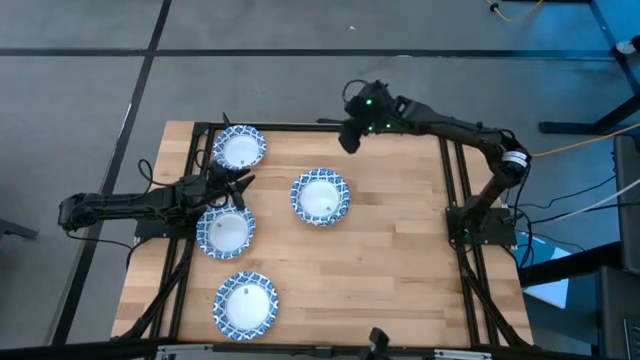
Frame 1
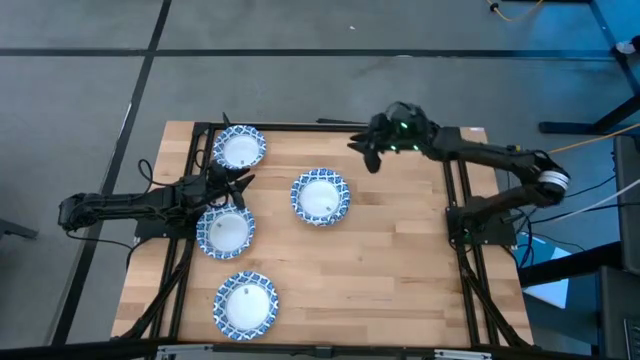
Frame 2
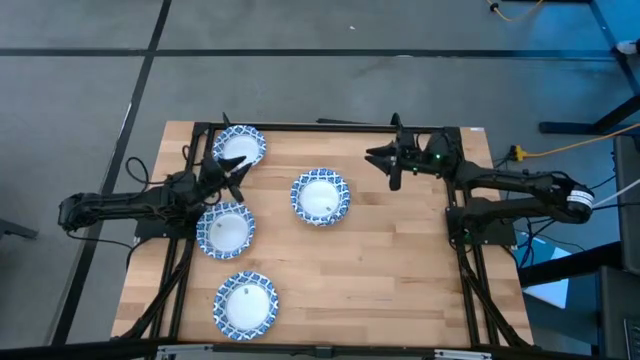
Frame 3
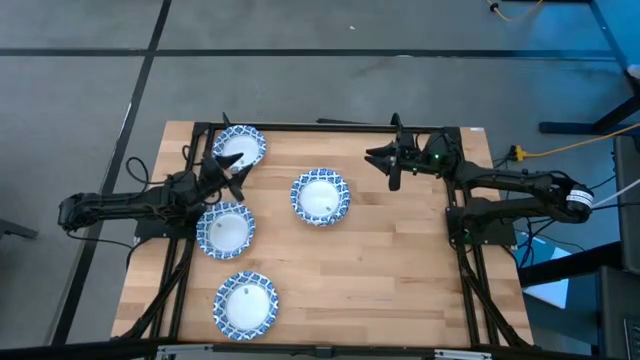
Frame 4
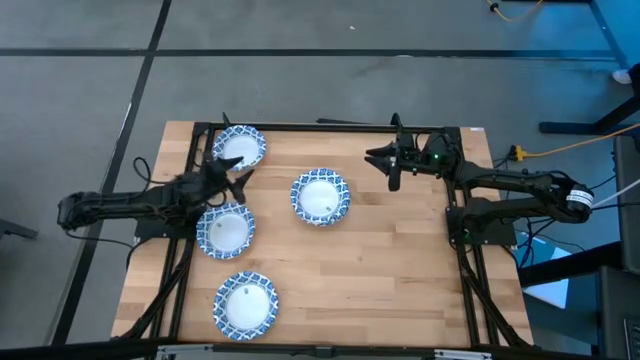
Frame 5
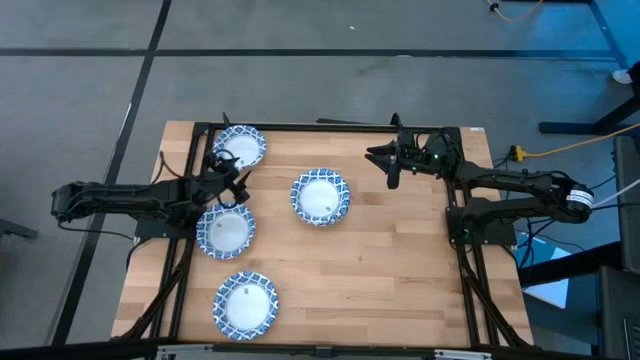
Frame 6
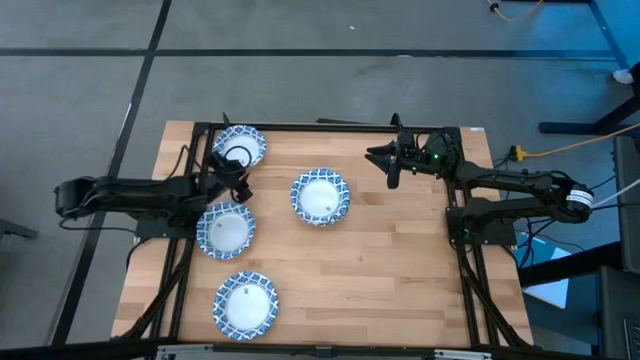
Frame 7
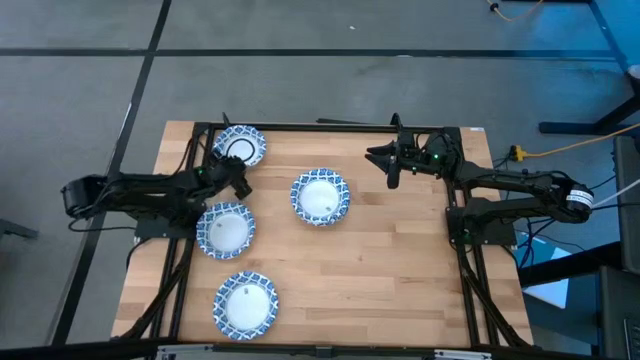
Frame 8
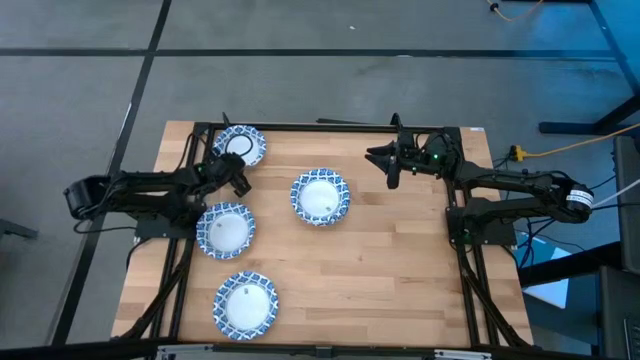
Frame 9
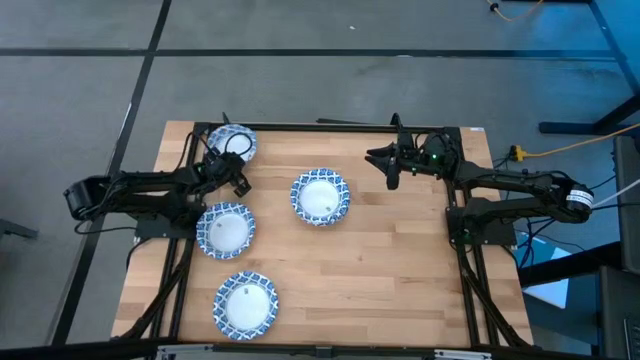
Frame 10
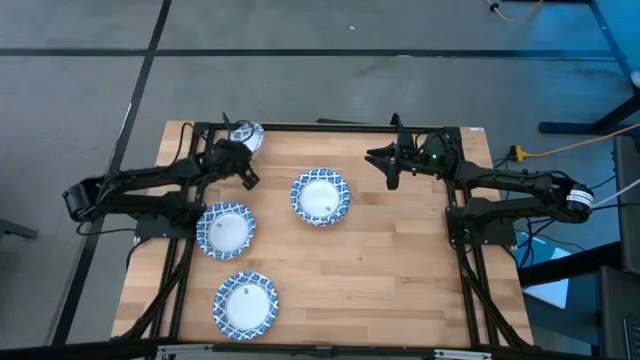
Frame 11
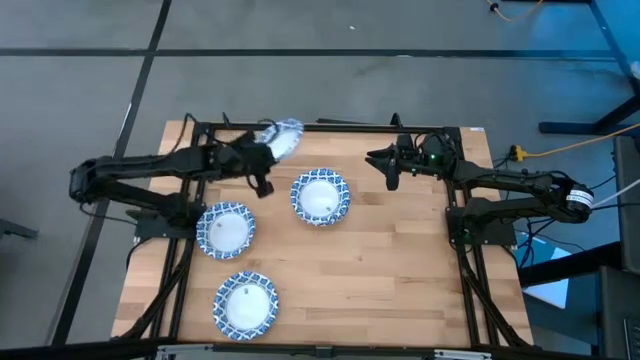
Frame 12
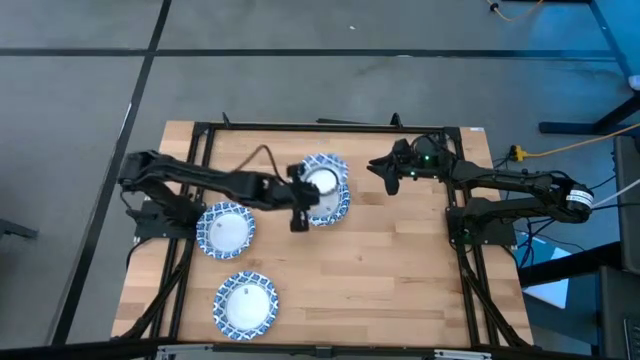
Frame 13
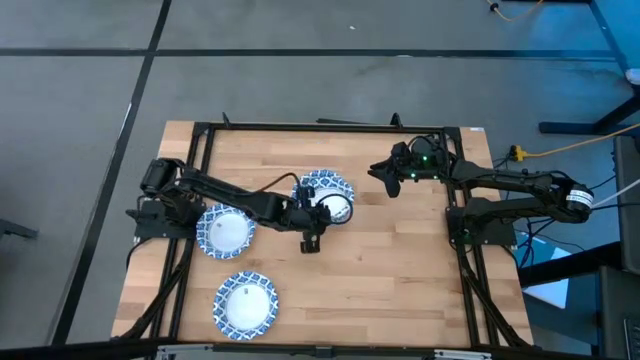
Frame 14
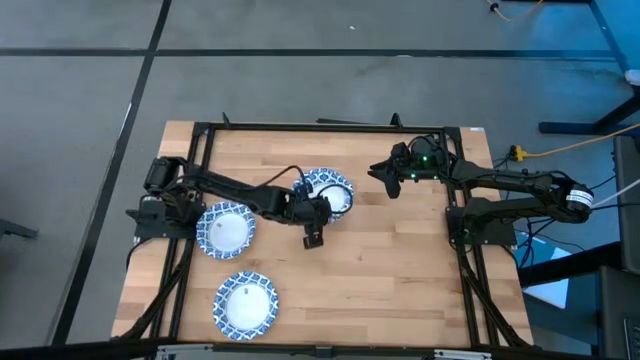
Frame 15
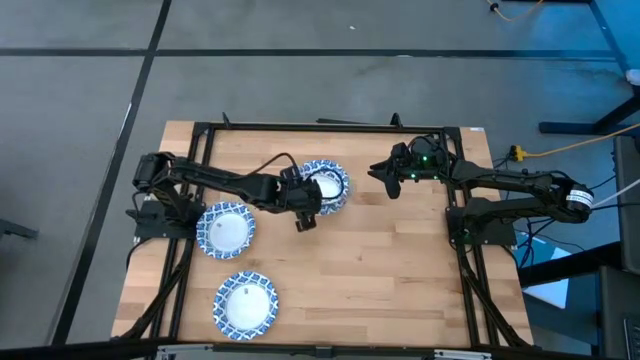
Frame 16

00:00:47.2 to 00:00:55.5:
Task: Nest bowls inside each other
Stack the white bowl on top of the white bowl

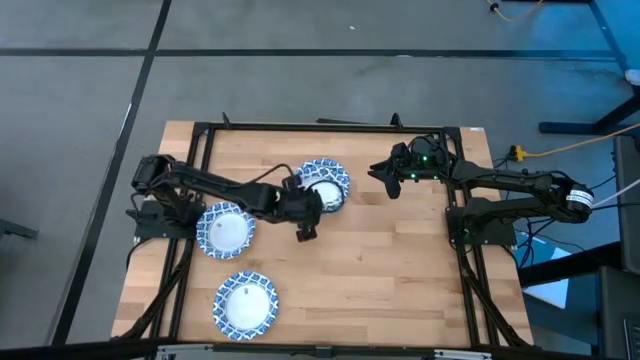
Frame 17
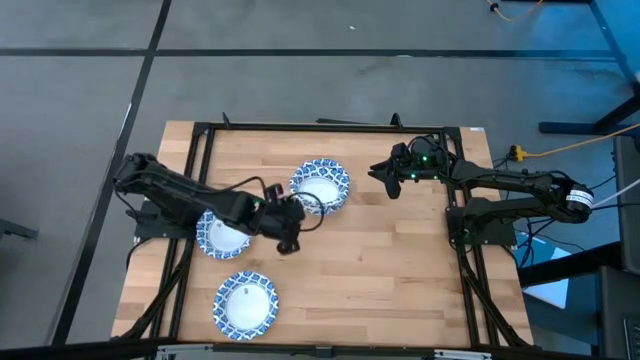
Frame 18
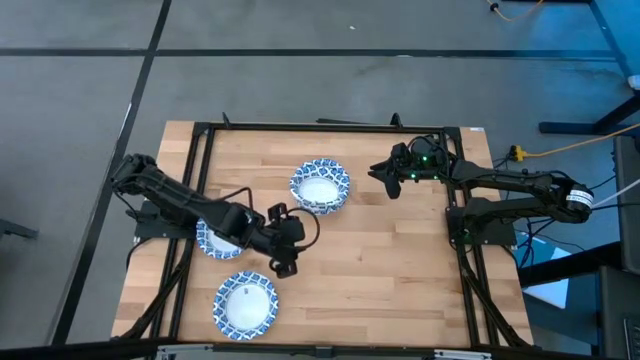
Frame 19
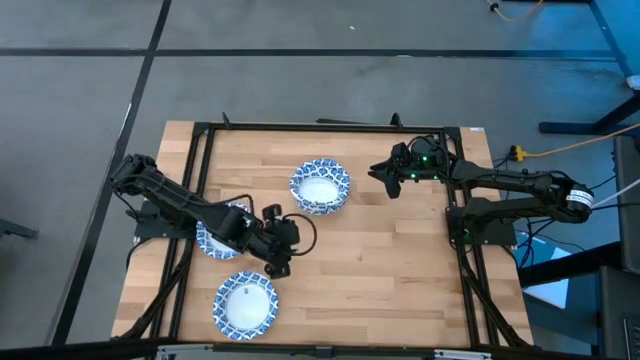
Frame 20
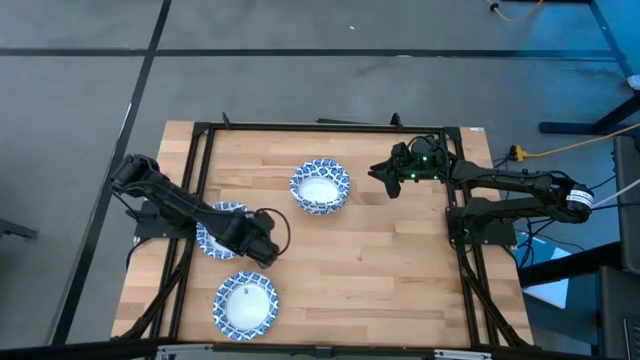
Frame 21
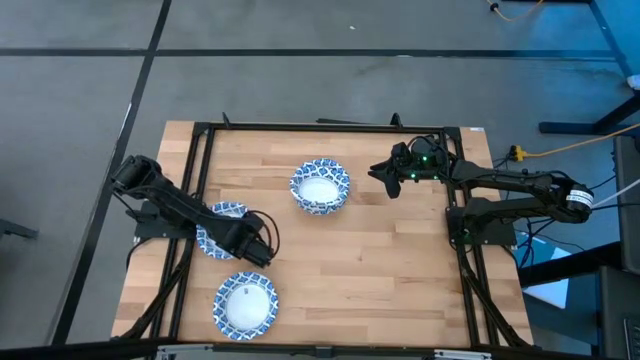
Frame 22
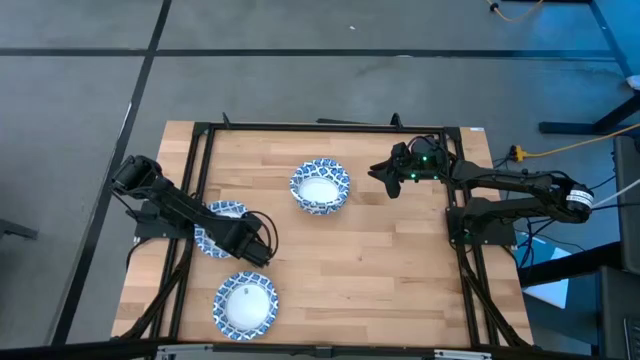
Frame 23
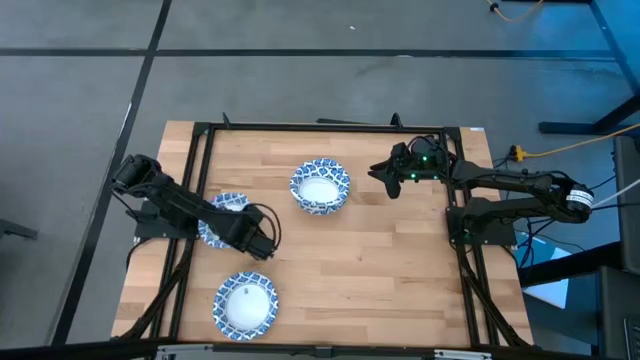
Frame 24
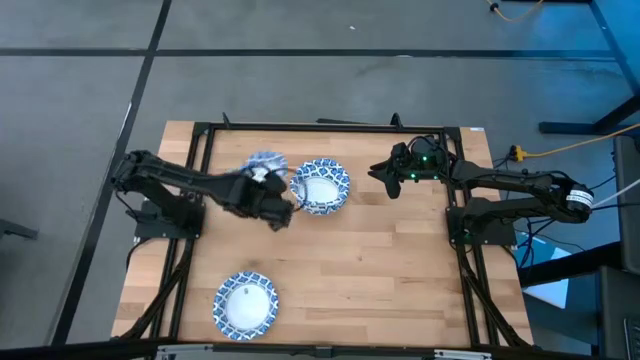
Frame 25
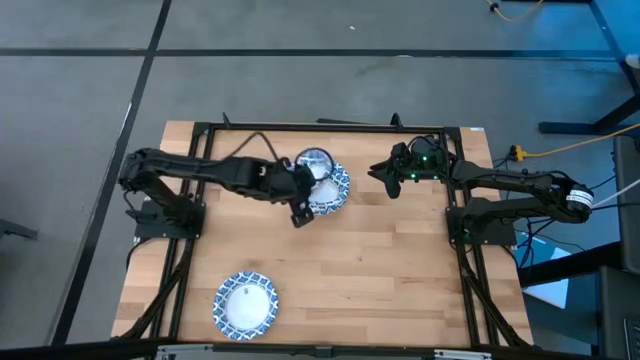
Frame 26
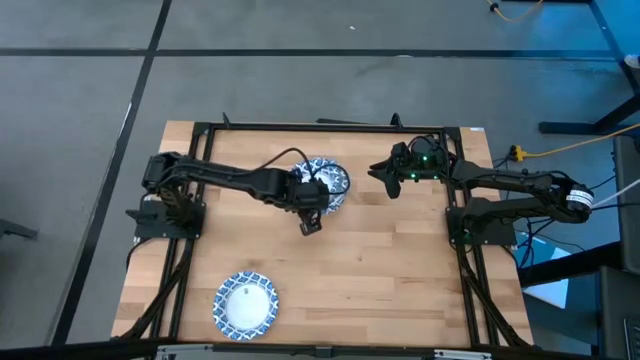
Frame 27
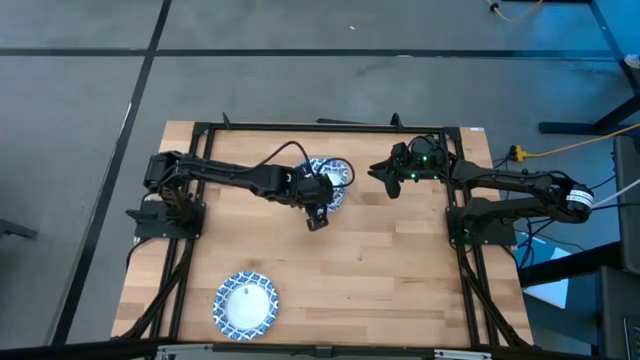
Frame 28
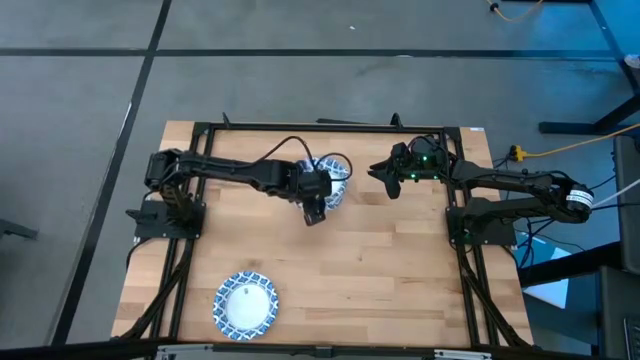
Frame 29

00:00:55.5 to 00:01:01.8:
Stack the white bowl on top of the white bowl

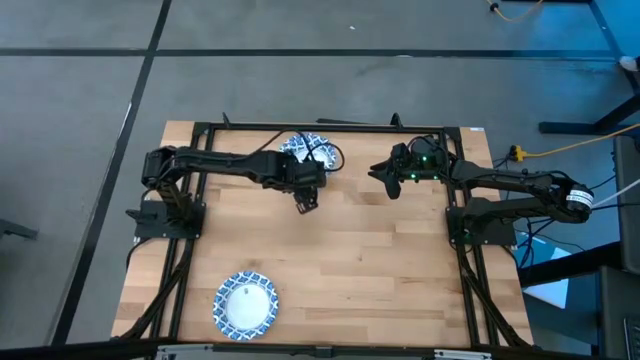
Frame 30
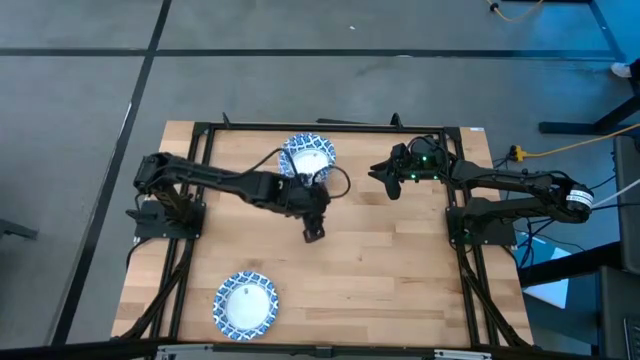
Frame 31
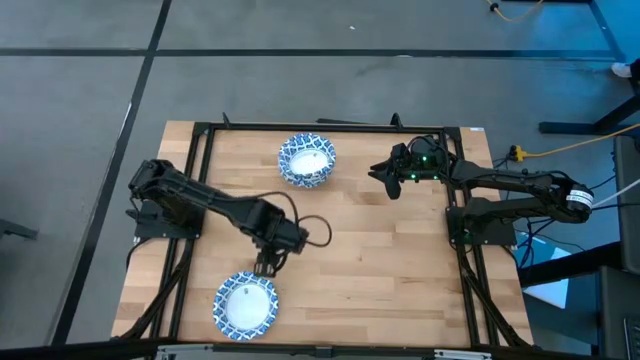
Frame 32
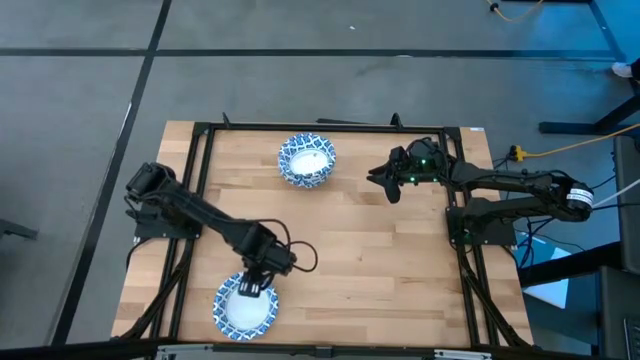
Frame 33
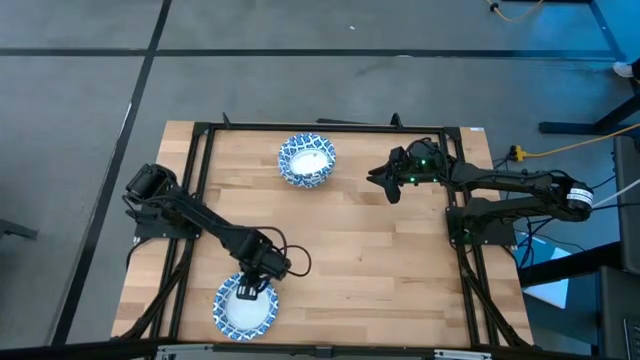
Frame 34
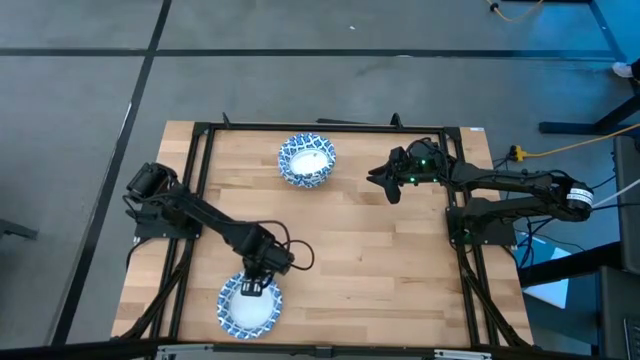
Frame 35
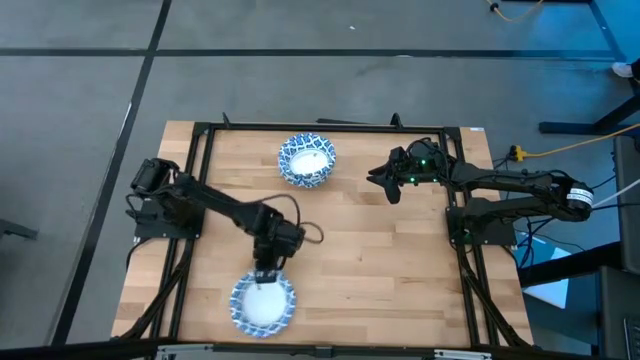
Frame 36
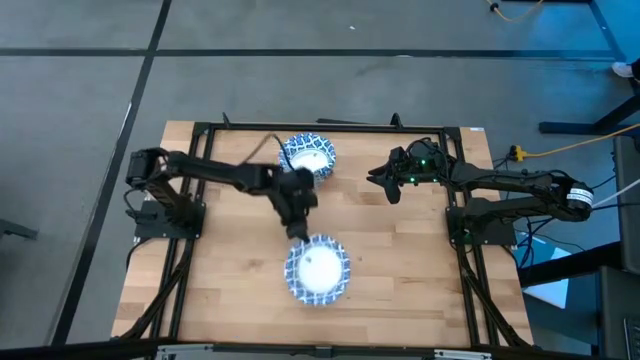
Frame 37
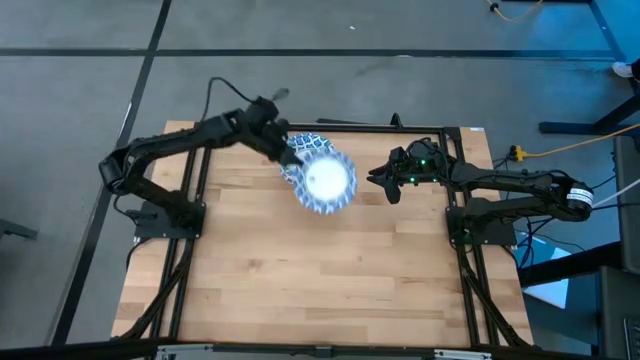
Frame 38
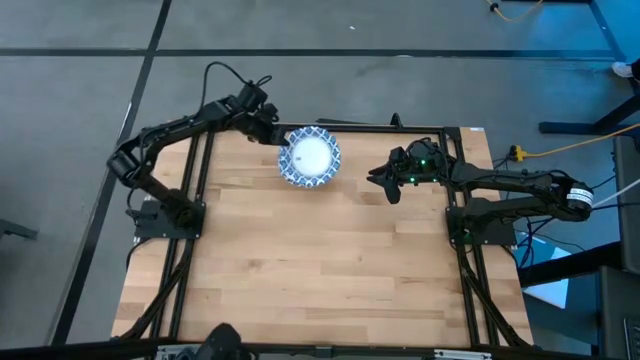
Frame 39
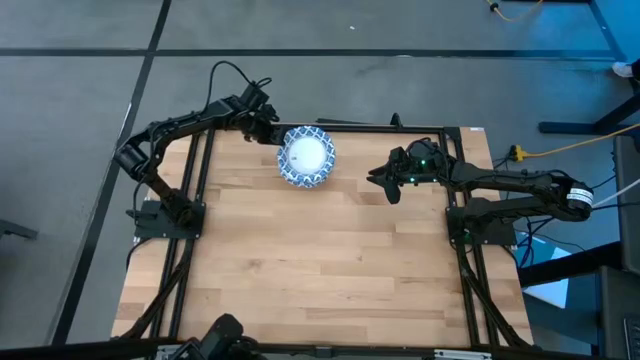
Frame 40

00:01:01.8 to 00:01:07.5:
Stack the white bowl on top of the white bowl

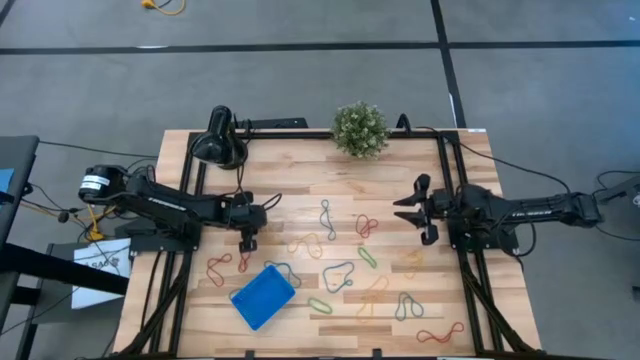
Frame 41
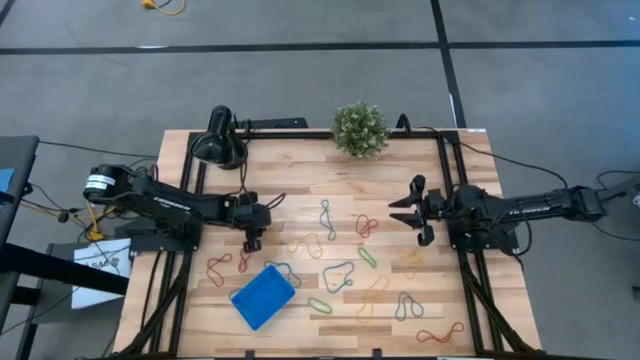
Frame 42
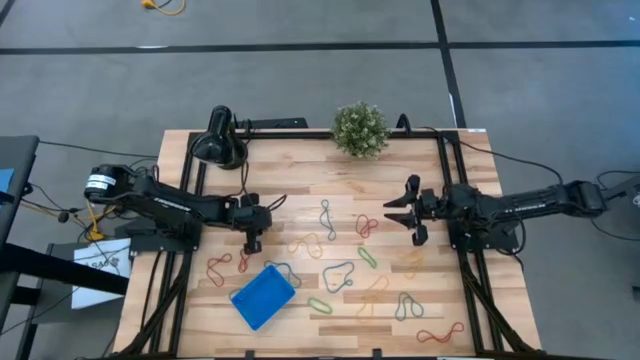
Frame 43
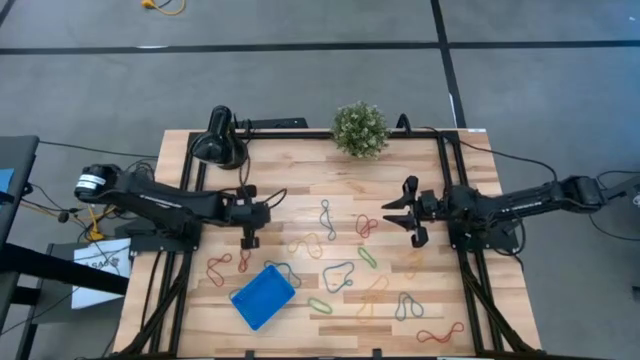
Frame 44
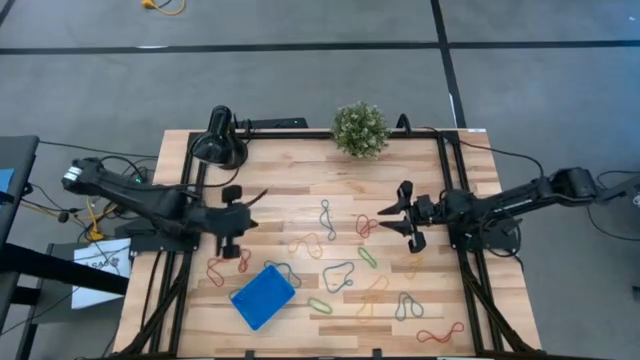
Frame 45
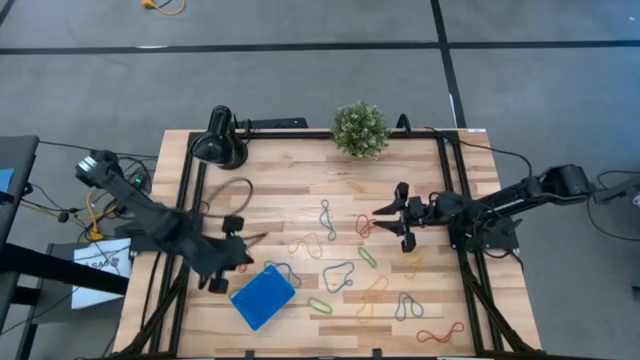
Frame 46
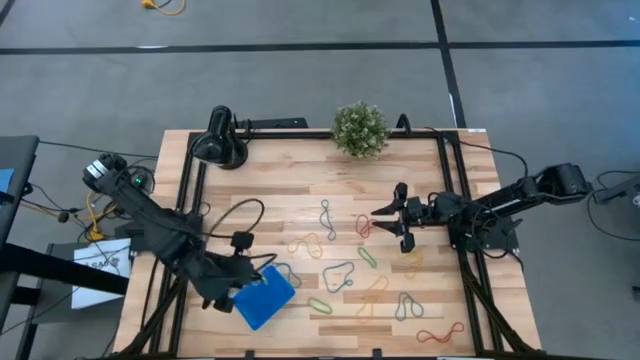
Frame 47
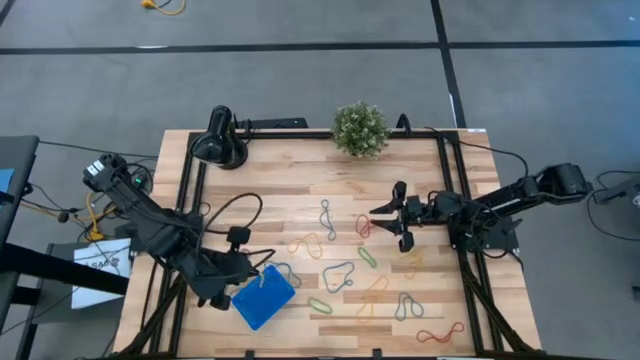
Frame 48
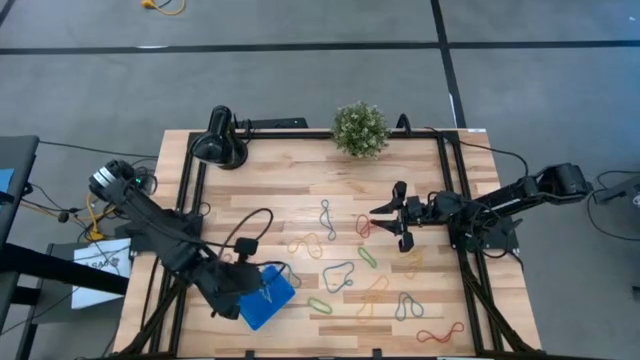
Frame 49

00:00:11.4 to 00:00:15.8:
Task: Pick and place rubber bands into bin
Put the yellow rubber band into the blue basket
